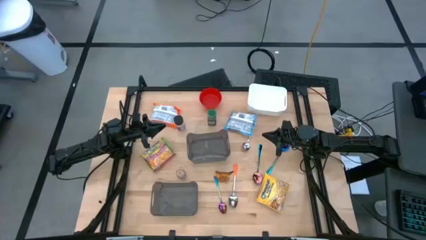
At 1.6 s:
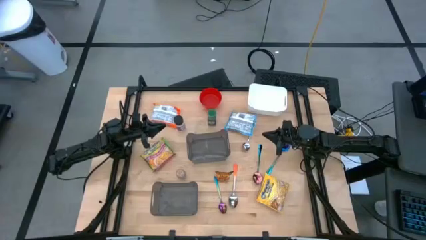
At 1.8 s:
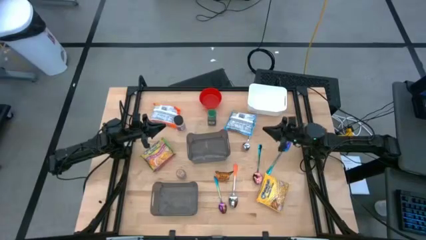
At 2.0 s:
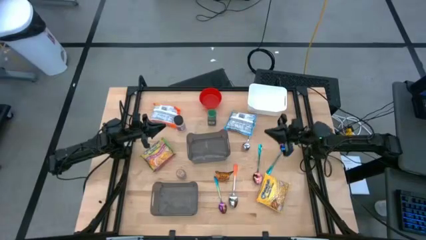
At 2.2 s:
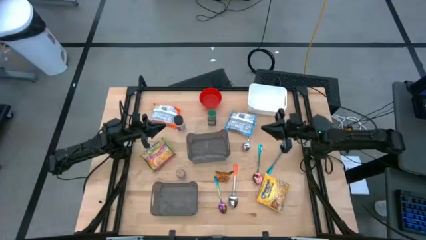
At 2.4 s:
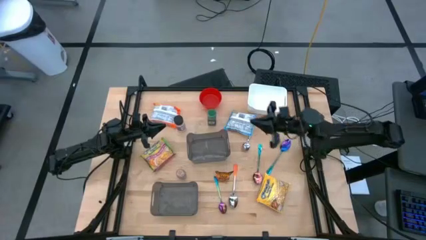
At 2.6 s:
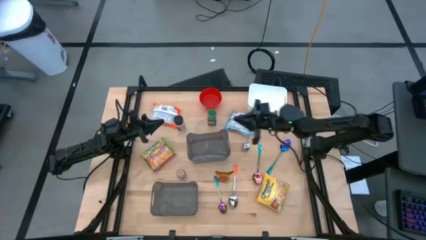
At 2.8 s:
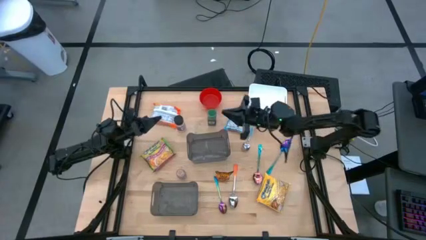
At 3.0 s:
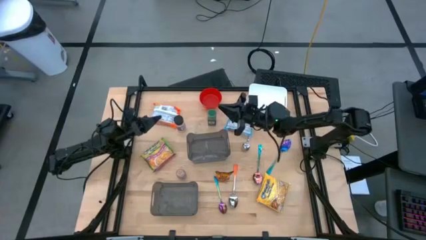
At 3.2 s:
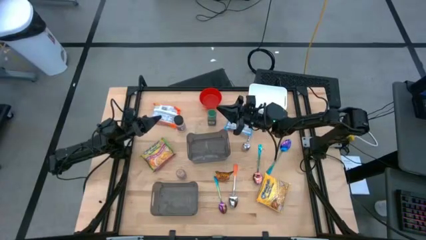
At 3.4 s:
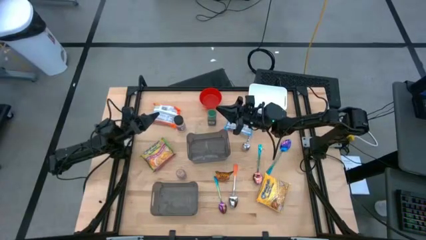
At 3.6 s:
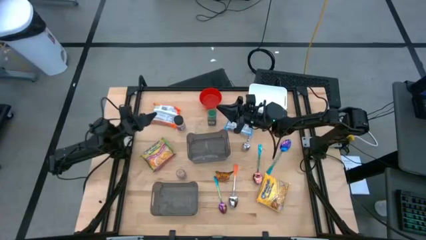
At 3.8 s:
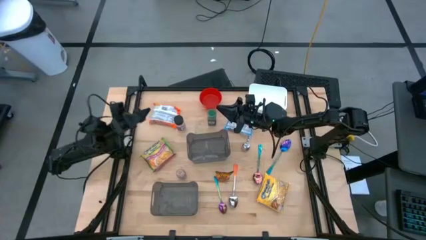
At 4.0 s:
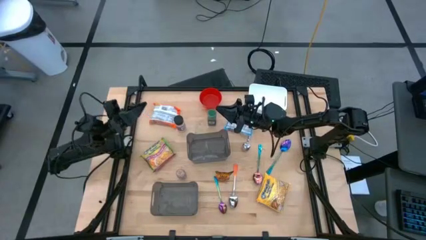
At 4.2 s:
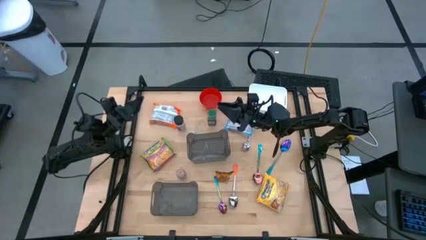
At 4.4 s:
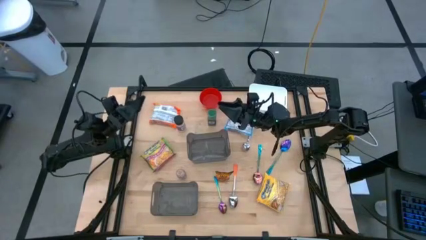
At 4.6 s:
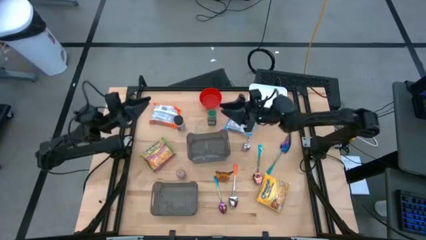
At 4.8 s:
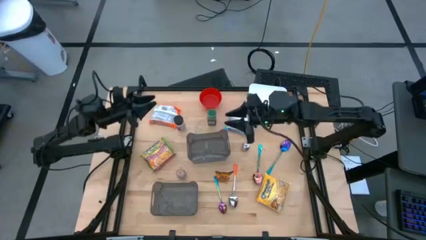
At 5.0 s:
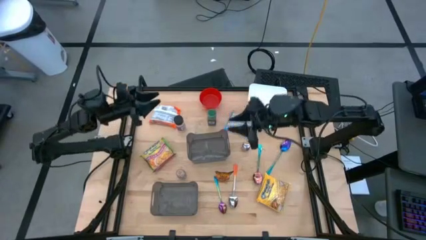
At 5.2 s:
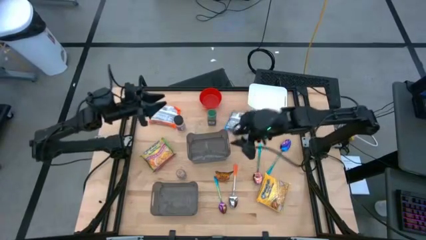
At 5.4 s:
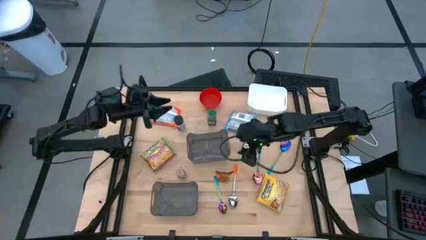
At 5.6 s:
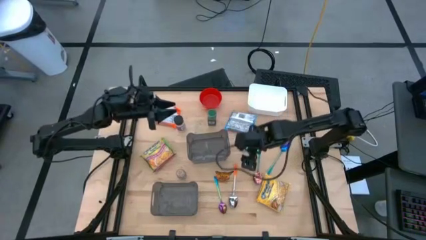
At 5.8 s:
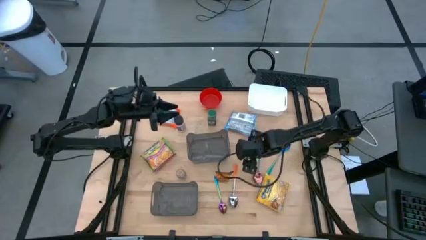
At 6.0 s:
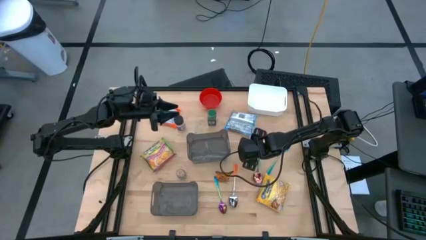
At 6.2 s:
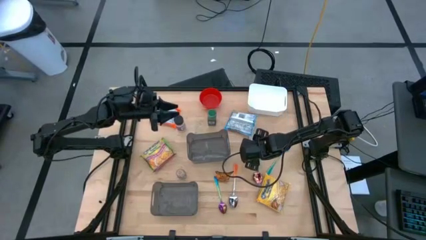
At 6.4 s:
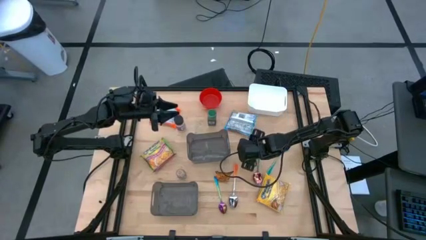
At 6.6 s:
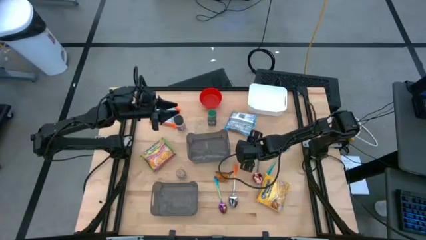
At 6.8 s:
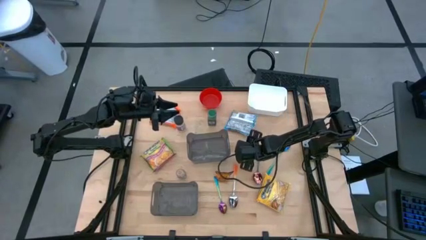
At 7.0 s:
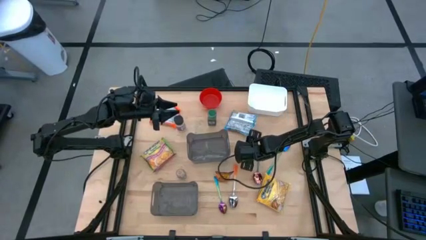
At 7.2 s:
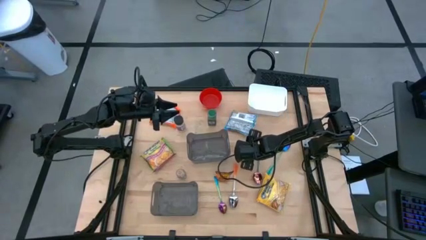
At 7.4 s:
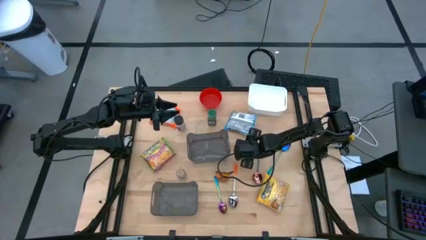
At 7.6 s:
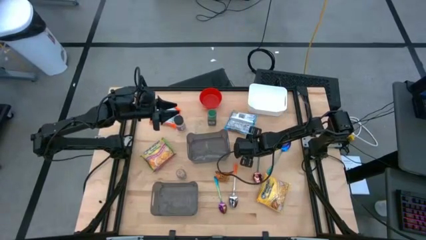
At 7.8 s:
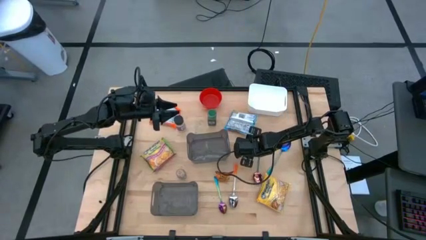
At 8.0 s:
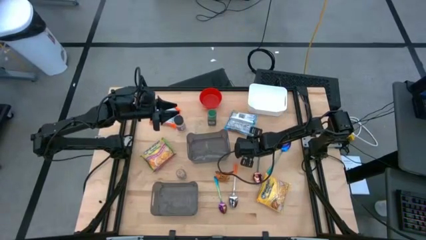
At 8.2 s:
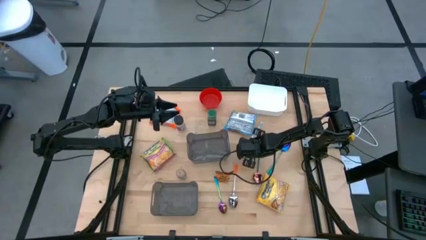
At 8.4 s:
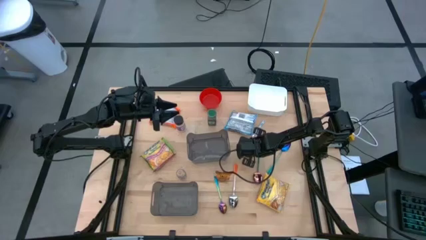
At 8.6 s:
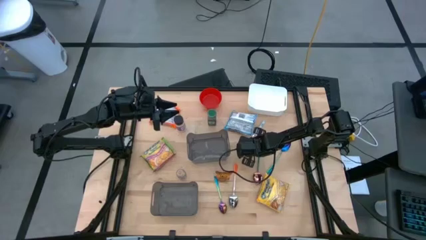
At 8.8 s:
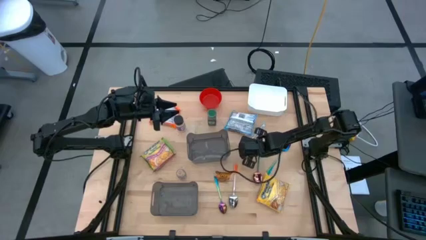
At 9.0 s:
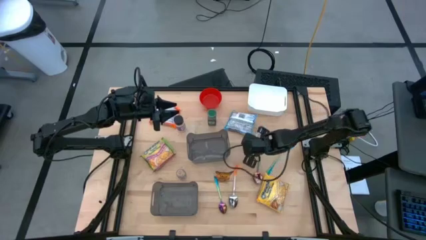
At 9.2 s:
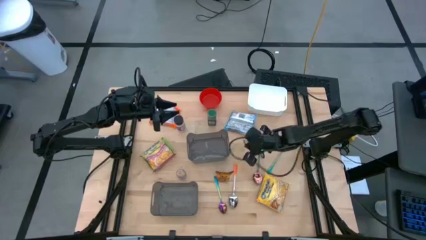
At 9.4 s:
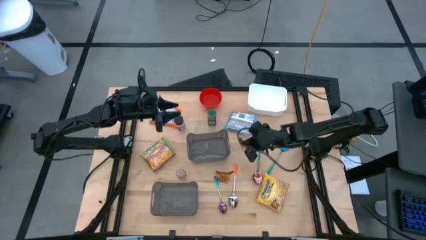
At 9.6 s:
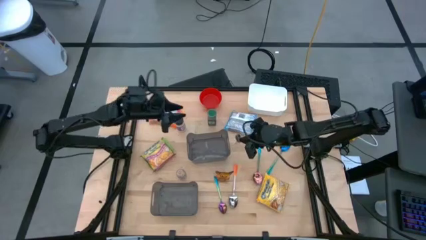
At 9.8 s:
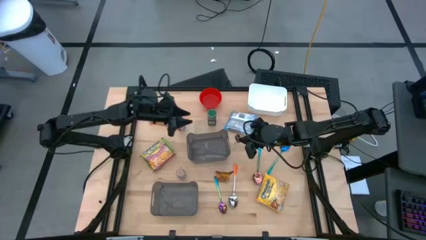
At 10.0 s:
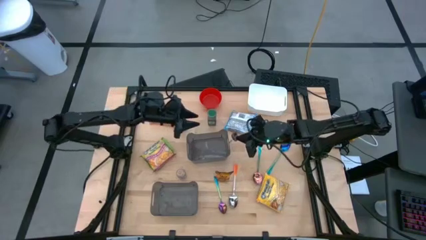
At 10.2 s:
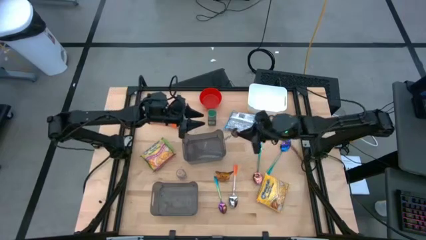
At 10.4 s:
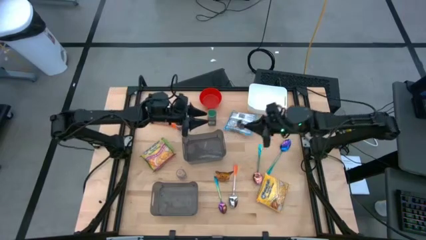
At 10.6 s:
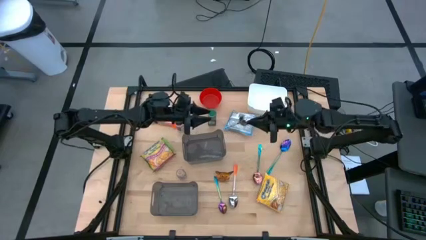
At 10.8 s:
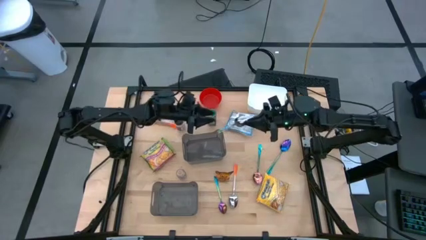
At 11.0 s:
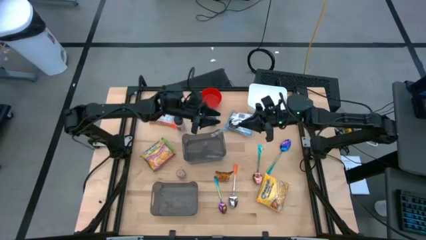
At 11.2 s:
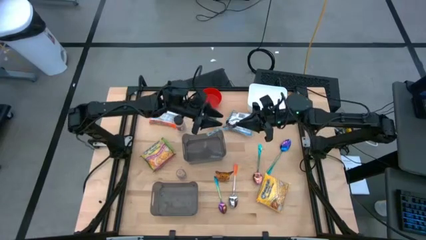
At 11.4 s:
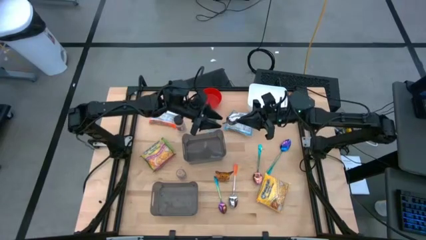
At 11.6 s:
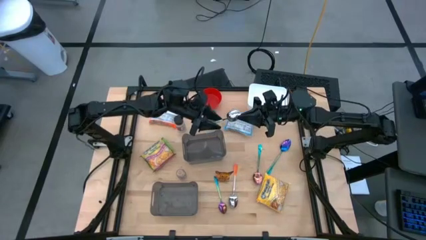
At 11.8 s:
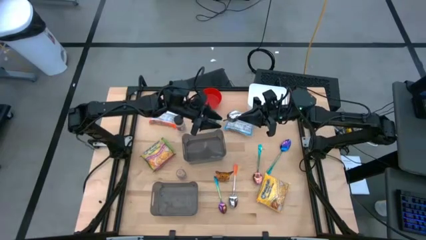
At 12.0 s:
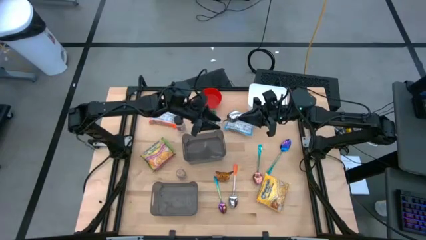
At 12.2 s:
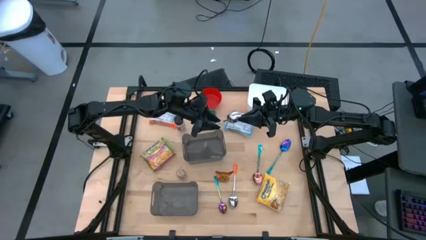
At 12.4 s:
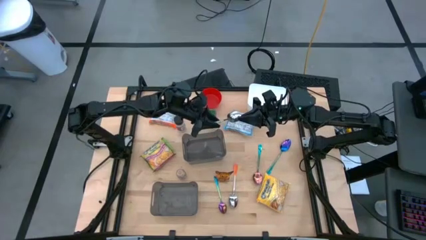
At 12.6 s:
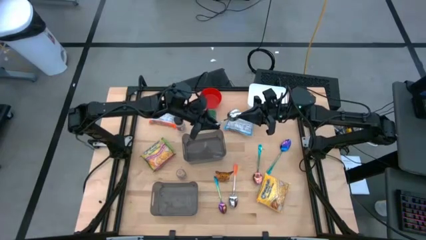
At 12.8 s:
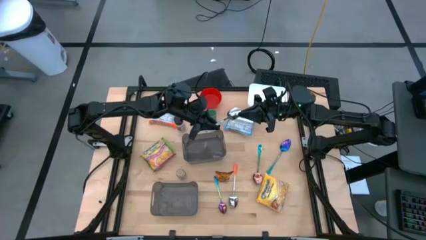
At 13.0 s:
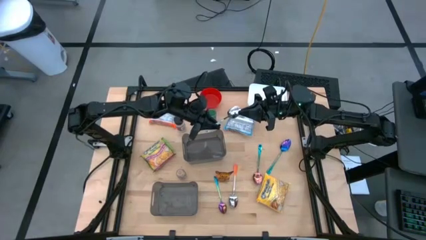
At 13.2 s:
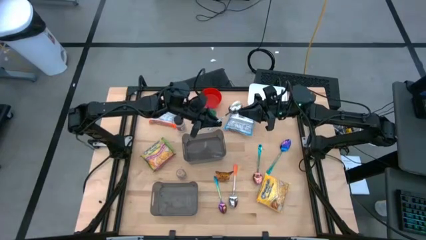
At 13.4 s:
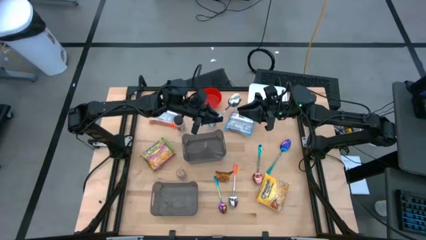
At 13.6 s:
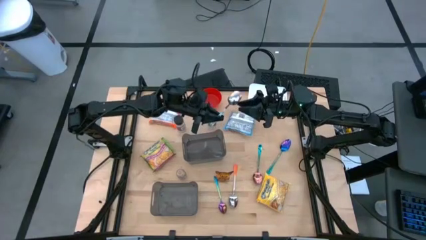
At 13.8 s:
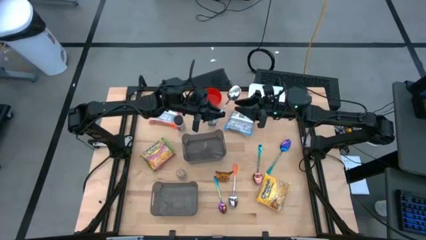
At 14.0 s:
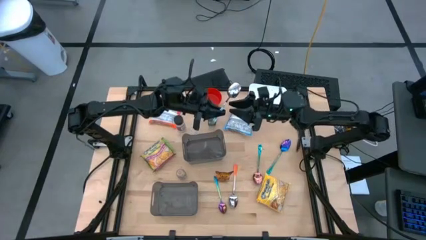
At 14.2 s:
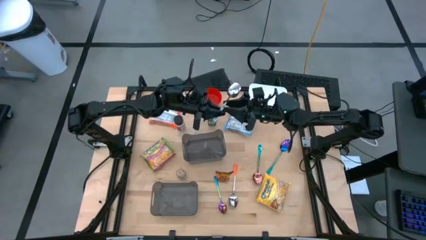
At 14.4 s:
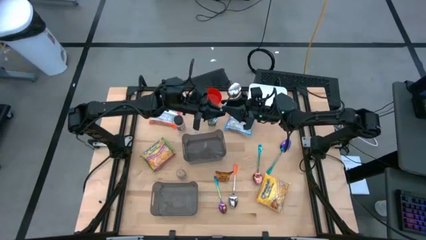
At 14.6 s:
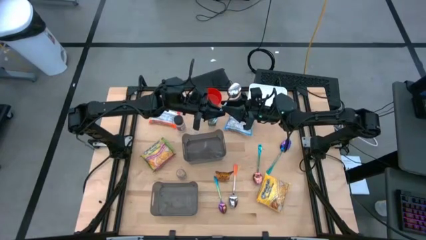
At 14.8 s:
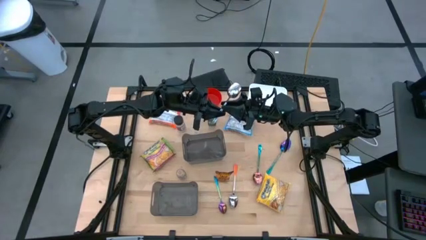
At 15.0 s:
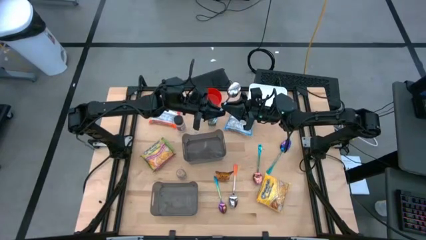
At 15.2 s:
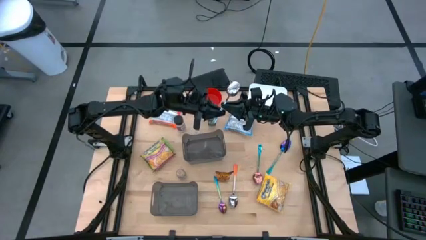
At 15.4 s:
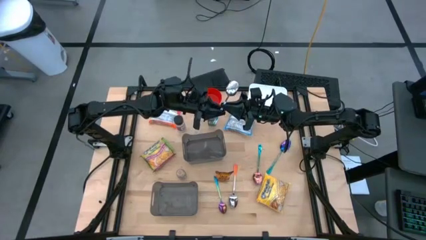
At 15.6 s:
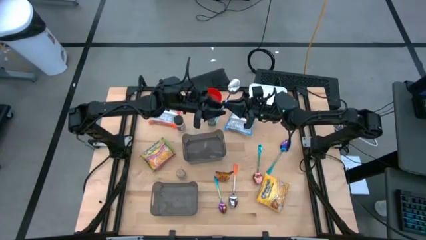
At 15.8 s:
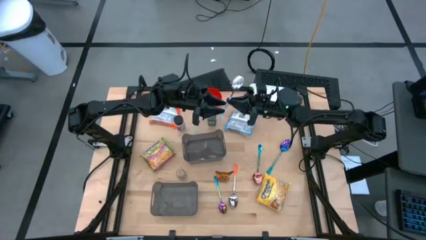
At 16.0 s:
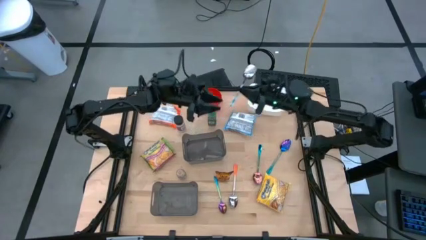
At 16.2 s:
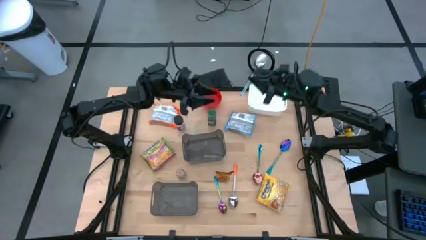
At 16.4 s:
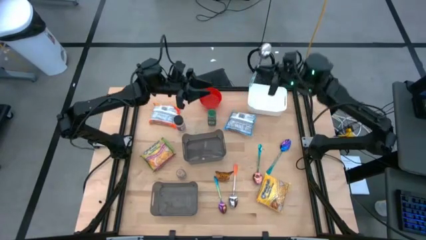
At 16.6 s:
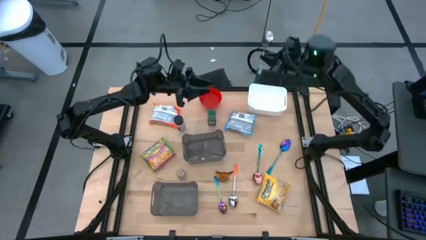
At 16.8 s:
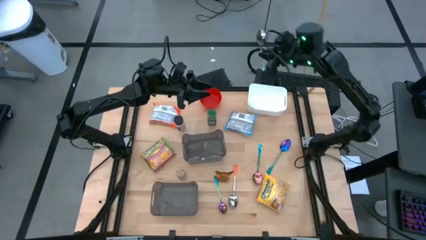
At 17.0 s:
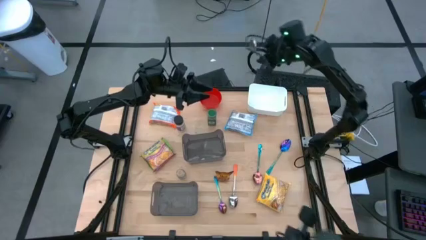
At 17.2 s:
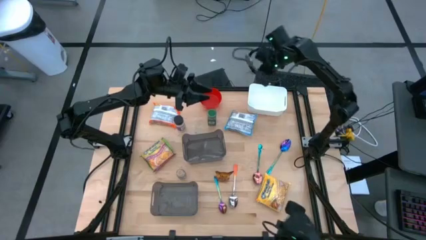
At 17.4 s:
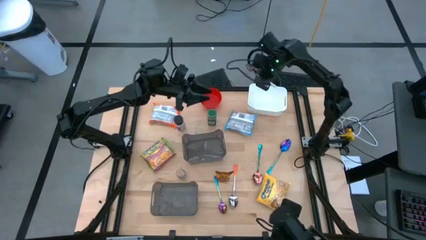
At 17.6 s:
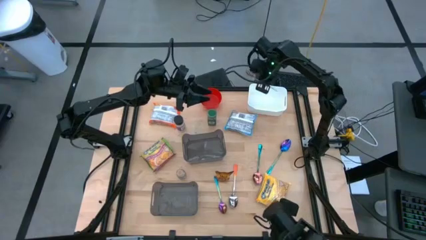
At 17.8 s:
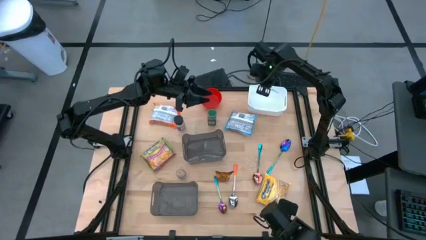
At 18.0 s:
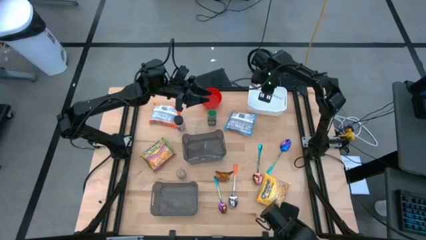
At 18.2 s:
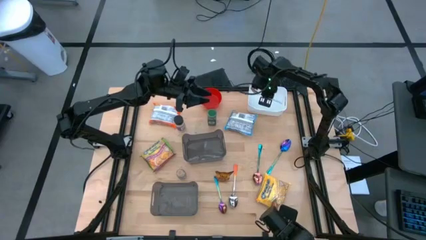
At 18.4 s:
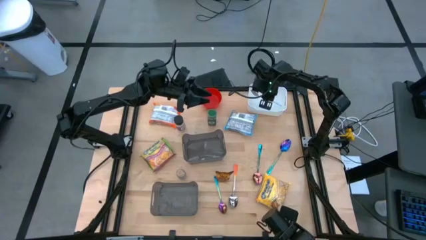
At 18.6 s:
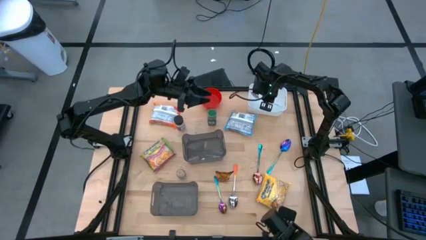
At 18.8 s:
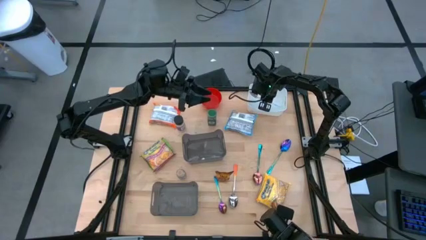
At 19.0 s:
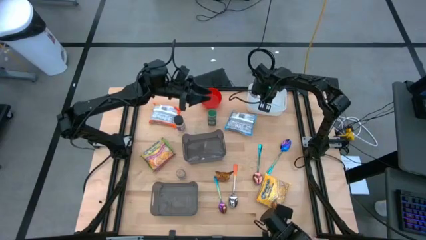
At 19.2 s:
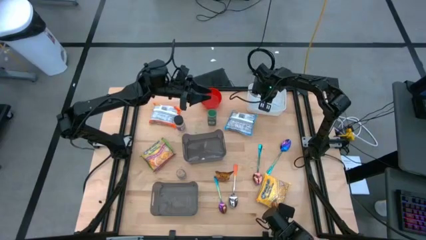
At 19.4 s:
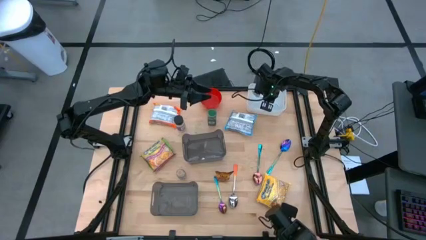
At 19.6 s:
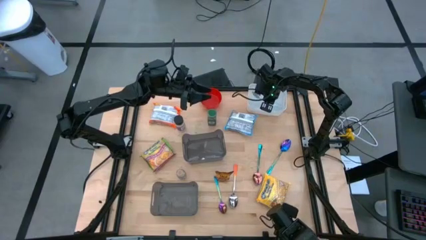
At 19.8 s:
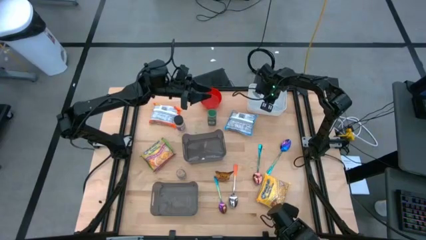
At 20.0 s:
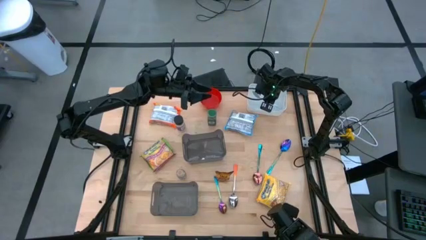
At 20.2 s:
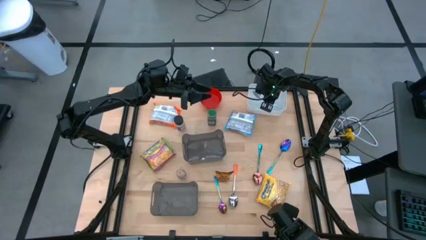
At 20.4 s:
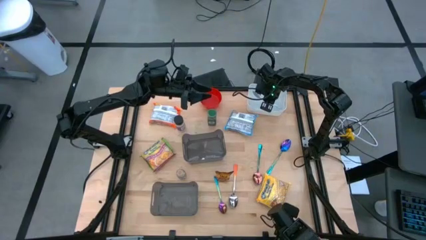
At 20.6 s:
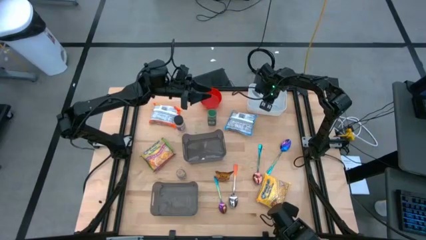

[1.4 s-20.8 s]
Task: Pick & Place Food Item
Put the white patterned spoon into the white bin
